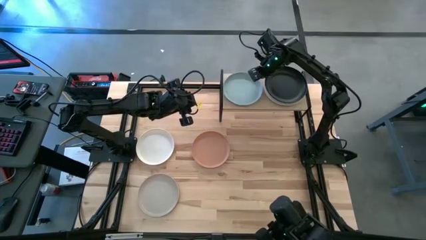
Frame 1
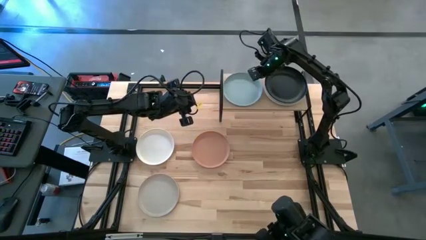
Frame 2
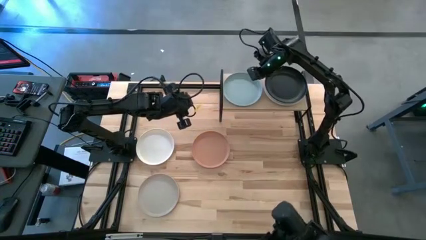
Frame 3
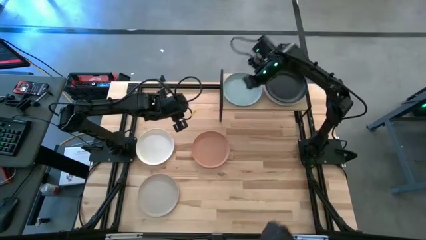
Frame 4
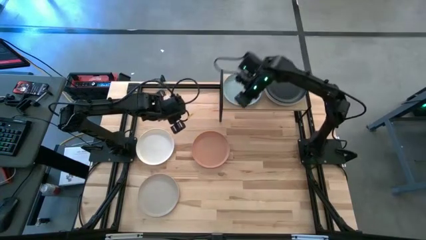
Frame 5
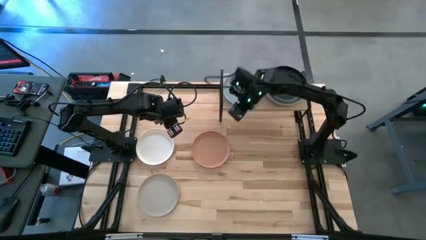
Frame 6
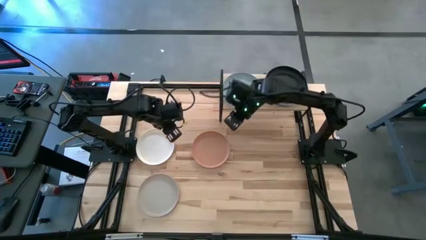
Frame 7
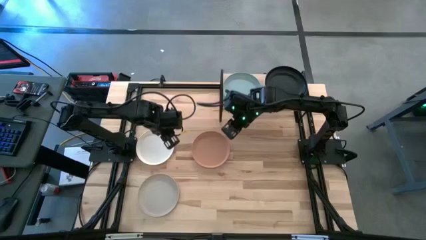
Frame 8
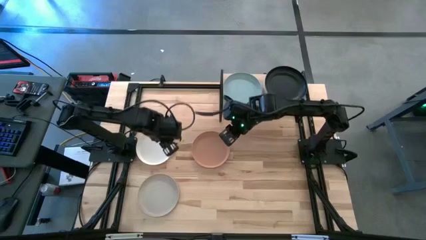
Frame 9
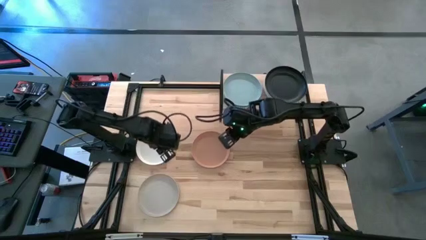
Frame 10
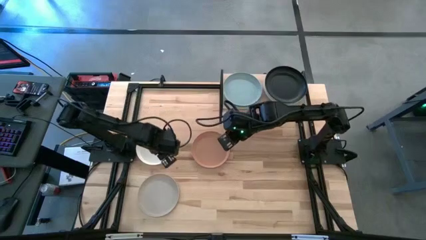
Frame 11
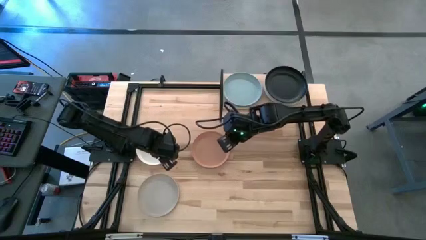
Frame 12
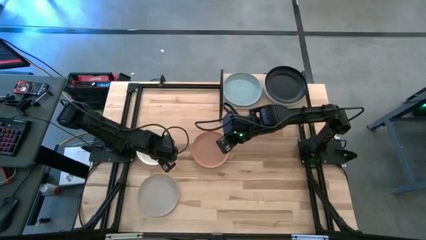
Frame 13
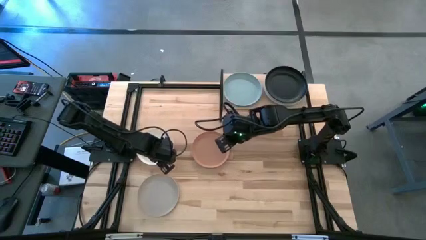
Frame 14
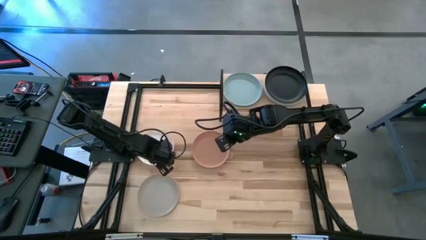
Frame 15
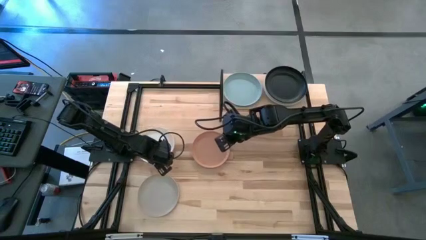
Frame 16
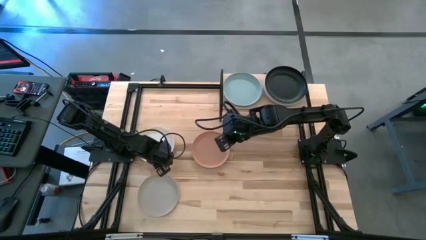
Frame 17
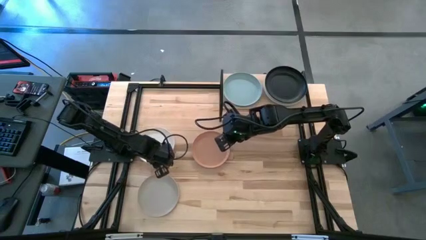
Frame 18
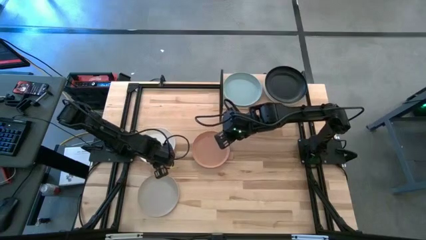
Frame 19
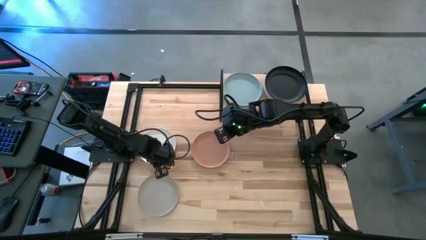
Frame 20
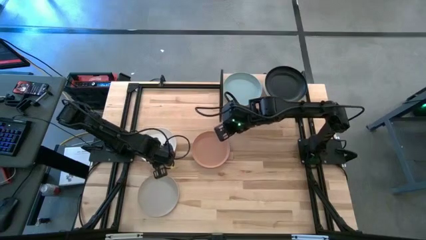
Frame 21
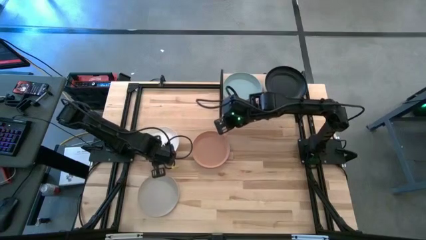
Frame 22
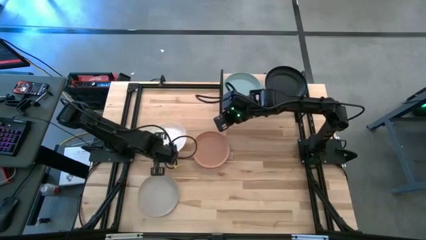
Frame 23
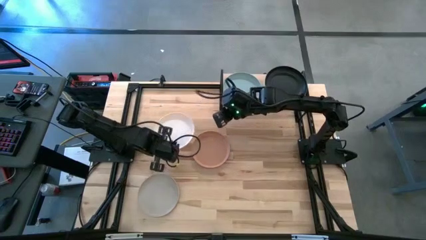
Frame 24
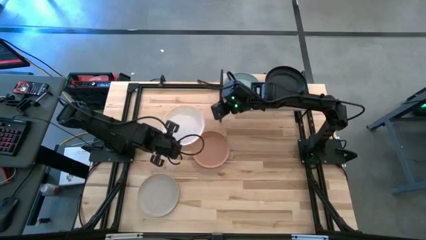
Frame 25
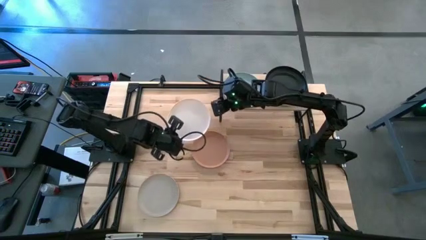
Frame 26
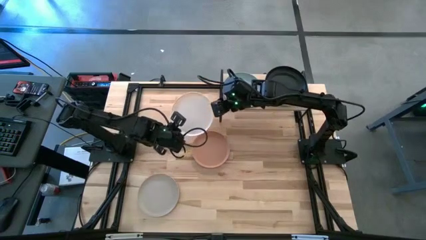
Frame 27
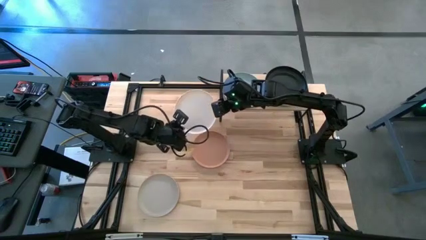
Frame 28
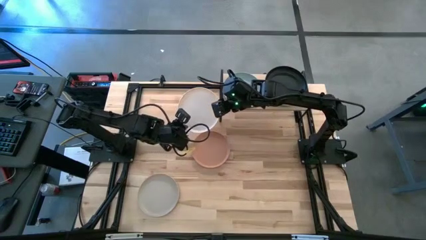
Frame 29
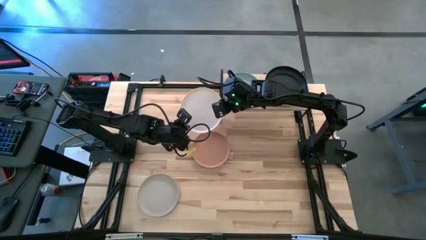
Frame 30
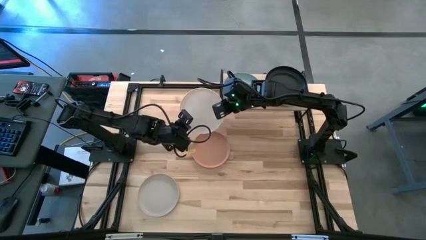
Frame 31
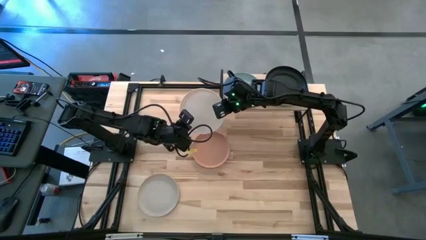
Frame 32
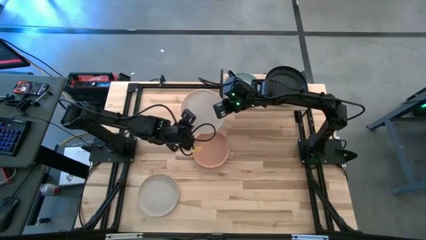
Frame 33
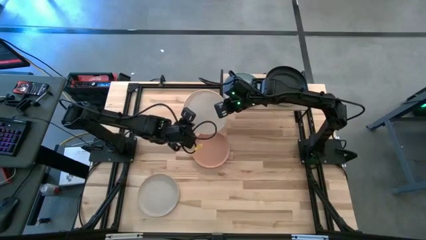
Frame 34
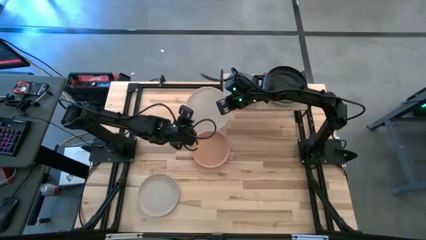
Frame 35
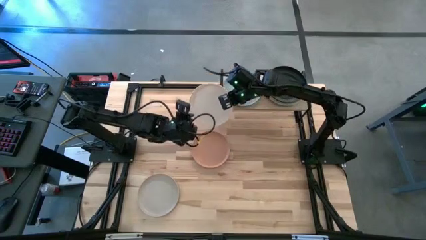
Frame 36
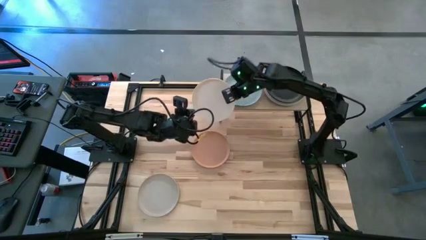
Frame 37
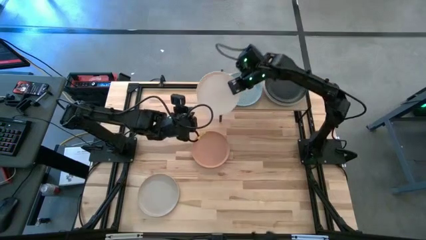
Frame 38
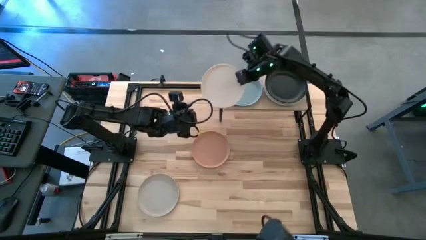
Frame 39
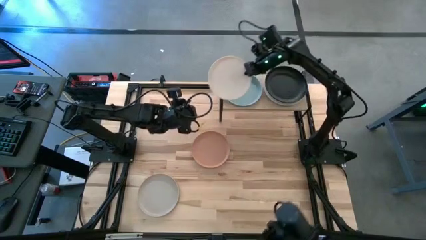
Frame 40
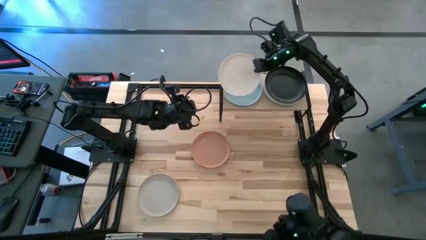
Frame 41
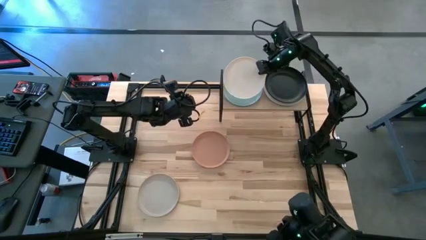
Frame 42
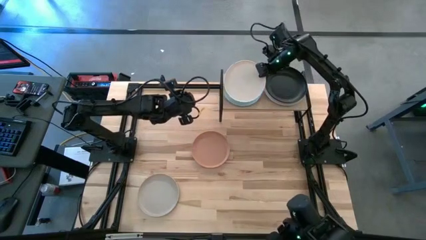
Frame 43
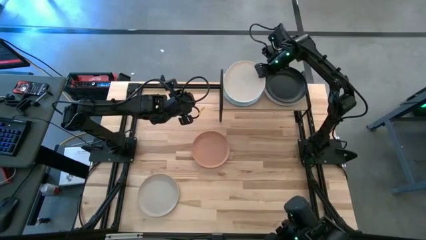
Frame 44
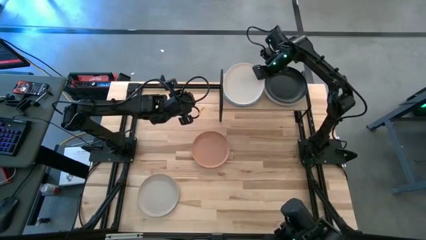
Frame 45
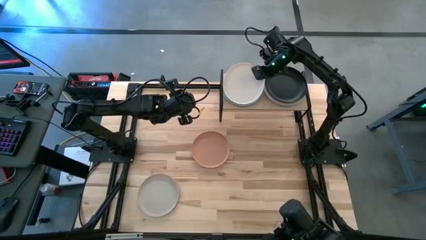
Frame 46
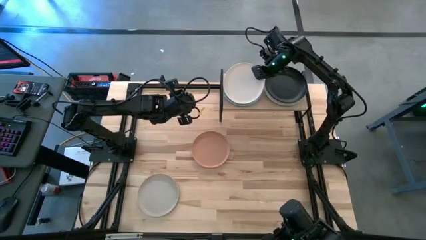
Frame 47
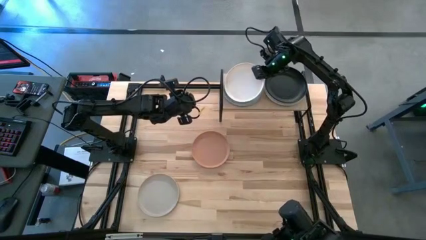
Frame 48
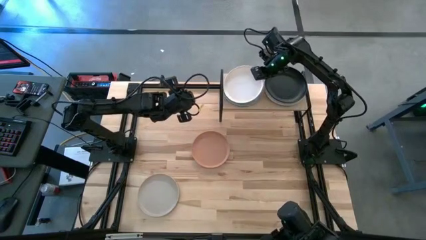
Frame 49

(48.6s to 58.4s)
Task: Place and stack plates onto a shelf
Stack the white plate on top of the blue plate on the shelf

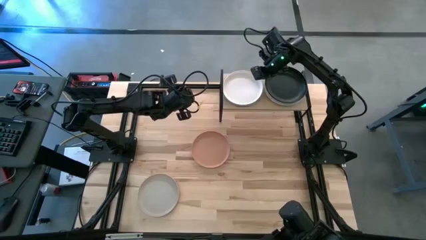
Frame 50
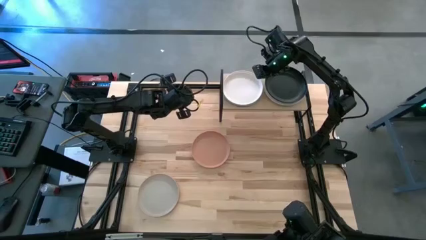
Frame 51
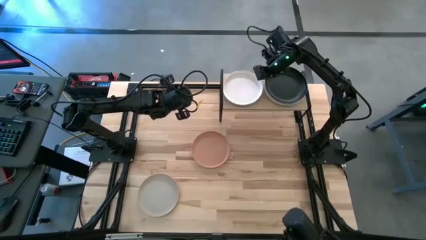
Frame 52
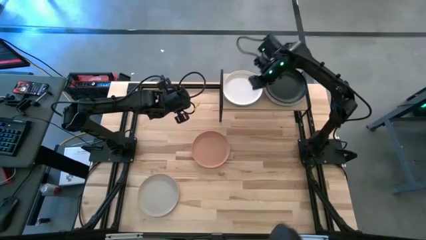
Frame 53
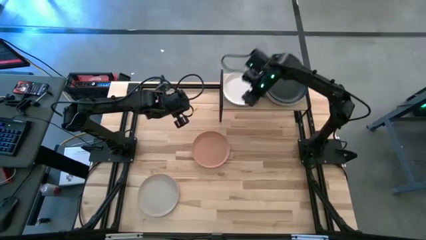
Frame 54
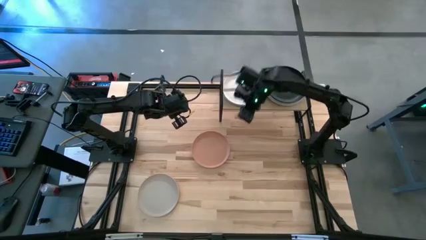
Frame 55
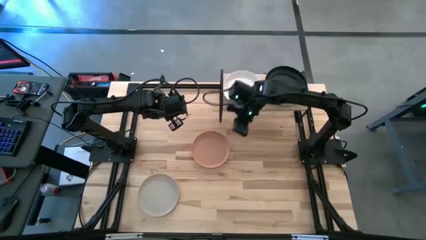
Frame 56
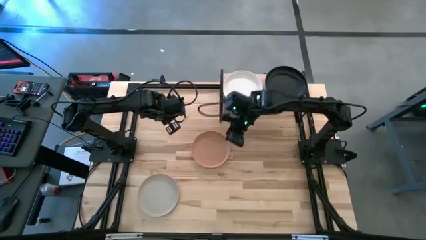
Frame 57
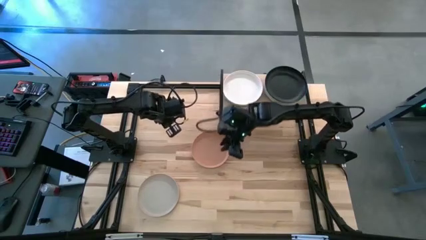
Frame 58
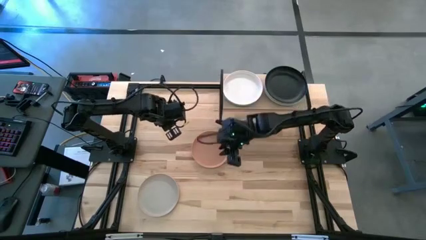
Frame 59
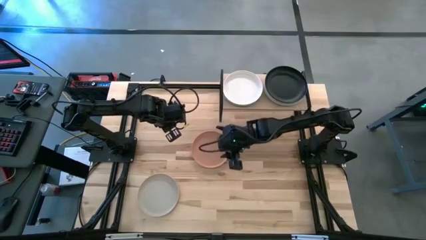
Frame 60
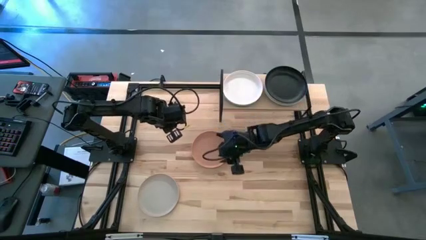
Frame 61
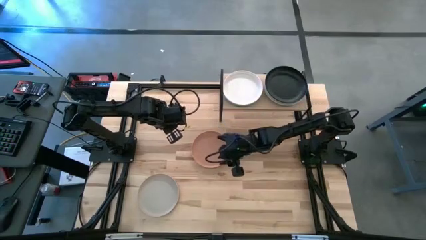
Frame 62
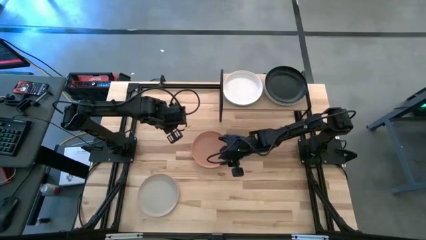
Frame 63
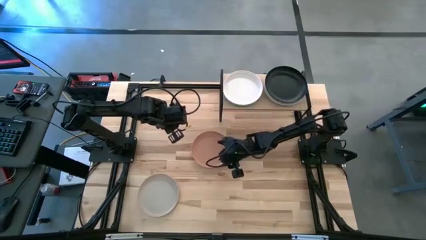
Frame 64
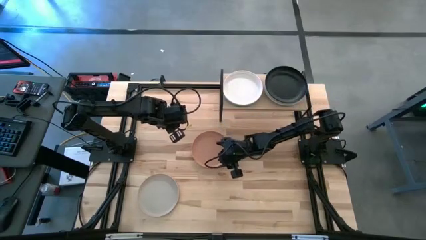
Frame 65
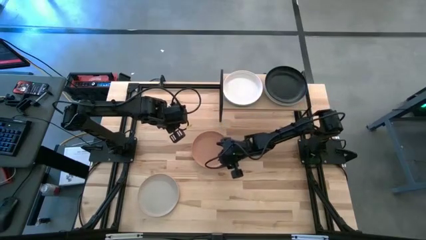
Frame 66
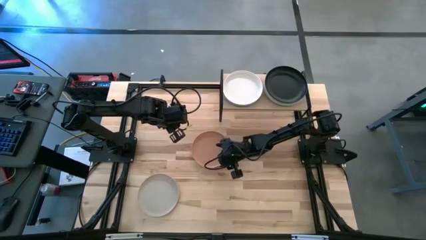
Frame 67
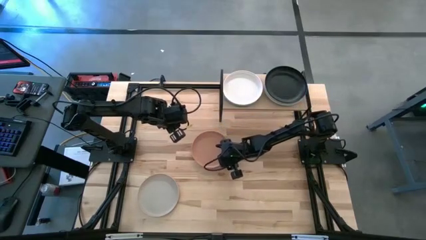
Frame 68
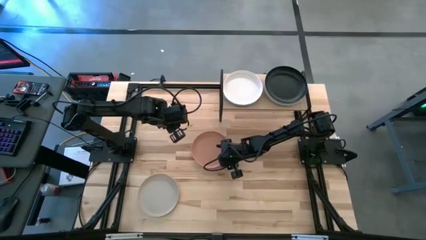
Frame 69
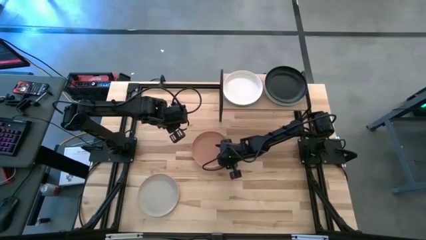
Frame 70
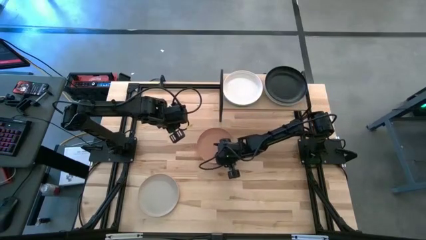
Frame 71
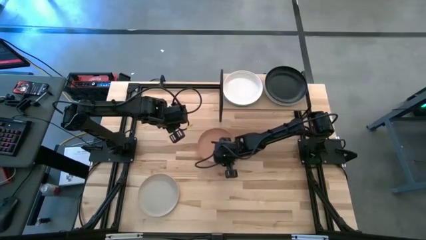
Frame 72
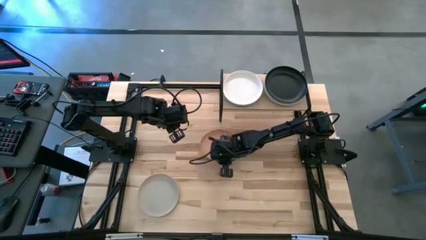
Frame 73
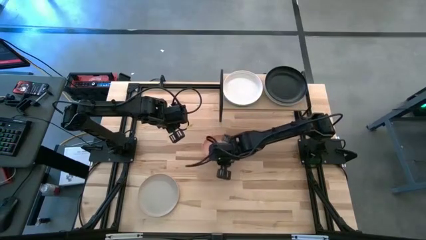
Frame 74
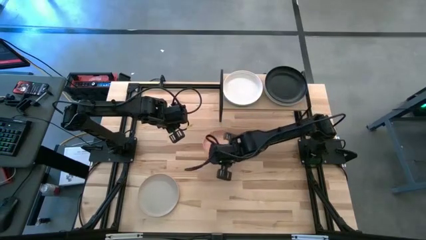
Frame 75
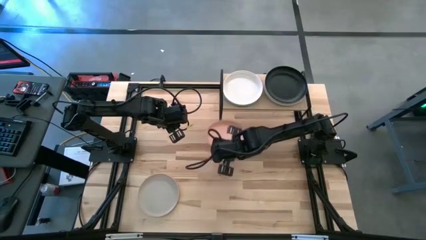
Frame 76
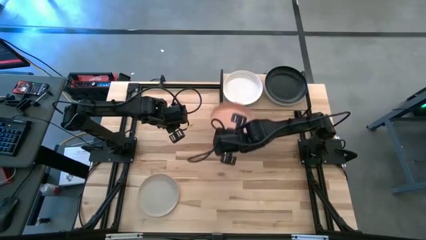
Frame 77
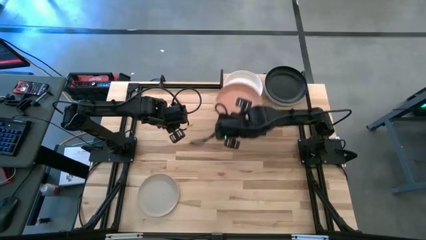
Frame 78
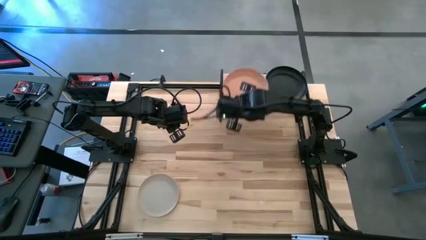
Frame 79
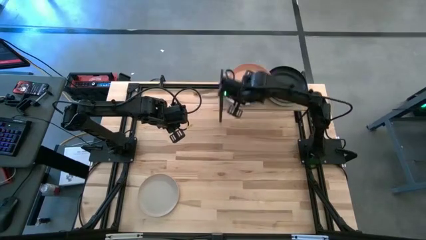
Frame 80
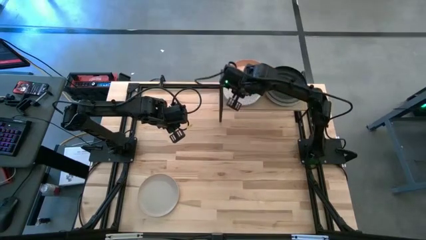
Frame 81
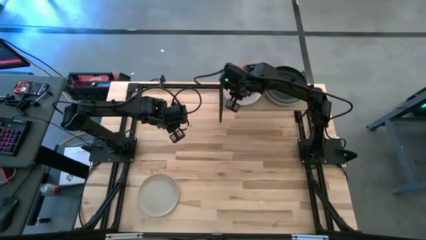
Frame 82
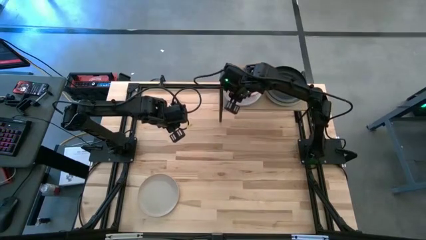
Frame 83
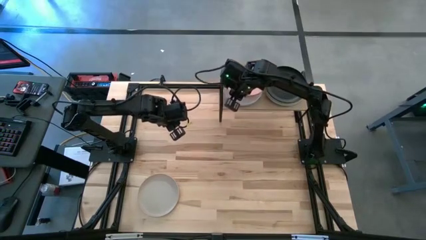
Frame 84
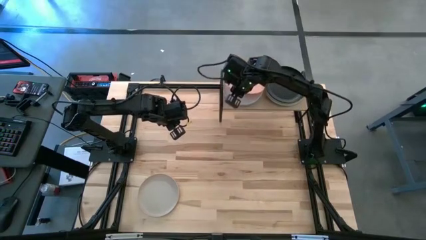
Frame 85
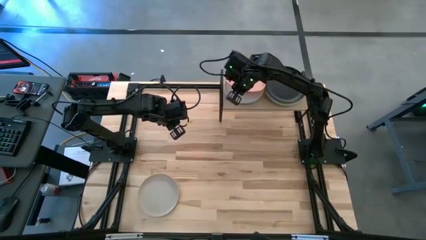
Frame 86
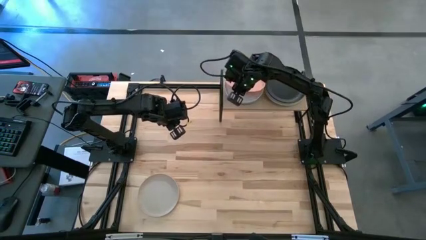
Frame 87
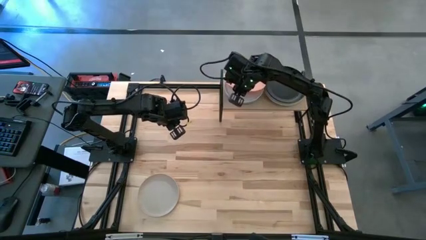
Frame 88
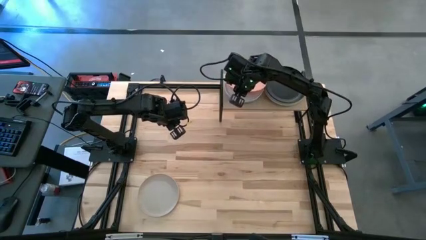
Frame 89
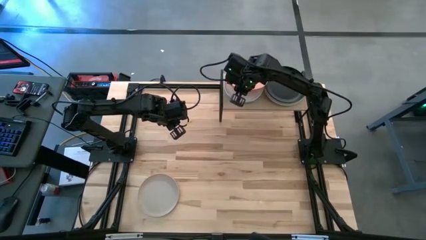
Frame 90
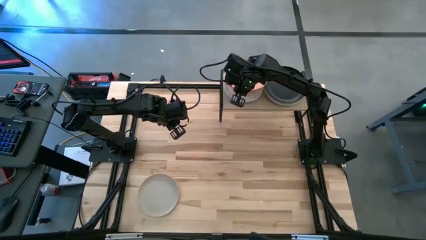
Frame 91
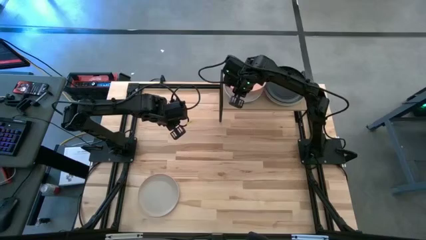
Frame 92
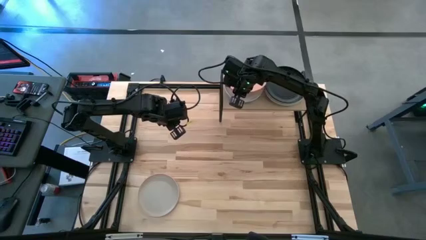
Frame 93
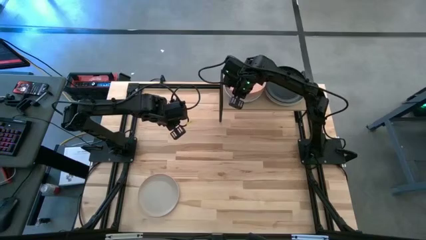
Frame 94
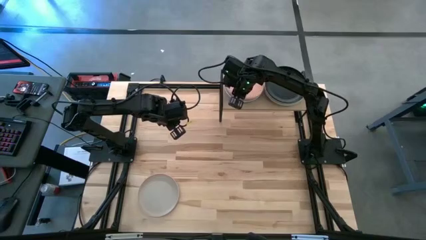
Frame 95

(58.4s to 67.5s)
Stack the brown plate on top of the white plate on the shelf
